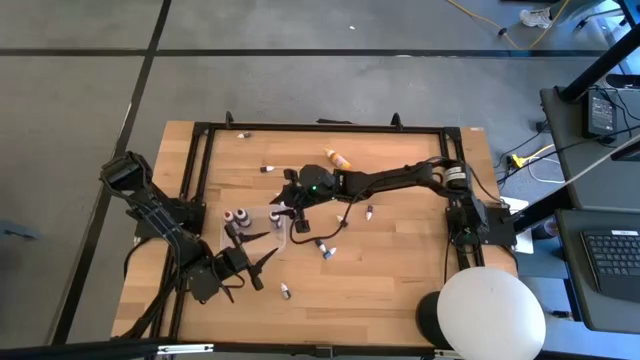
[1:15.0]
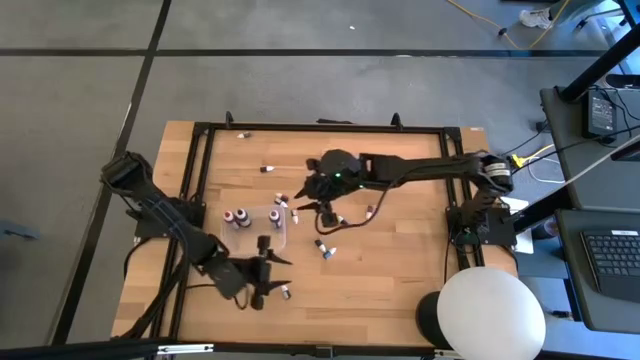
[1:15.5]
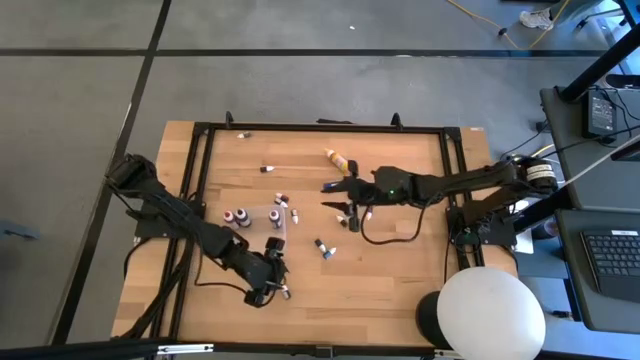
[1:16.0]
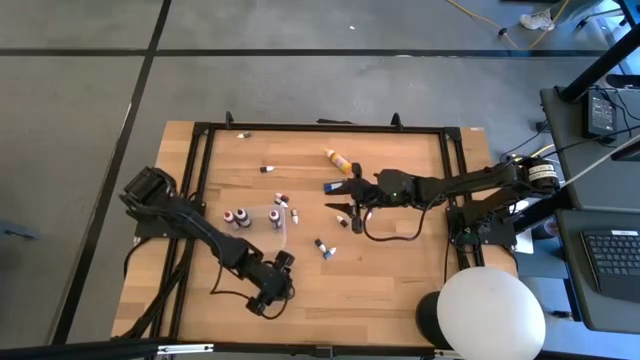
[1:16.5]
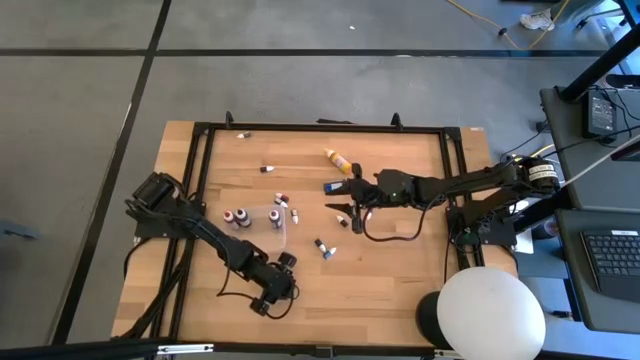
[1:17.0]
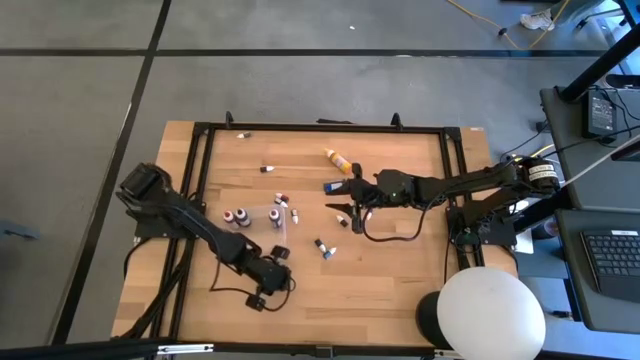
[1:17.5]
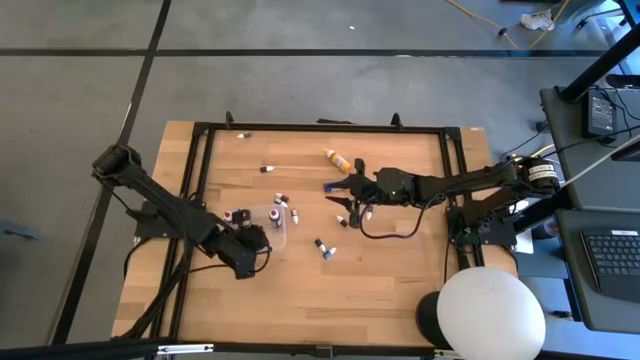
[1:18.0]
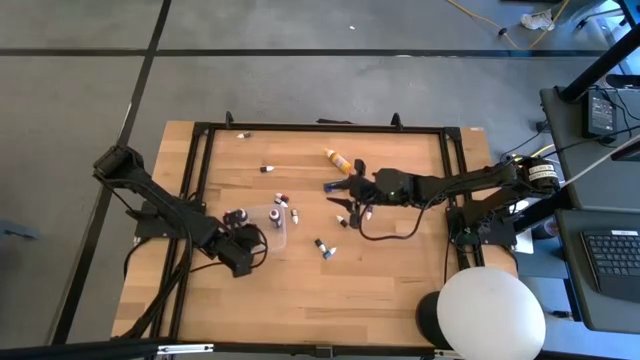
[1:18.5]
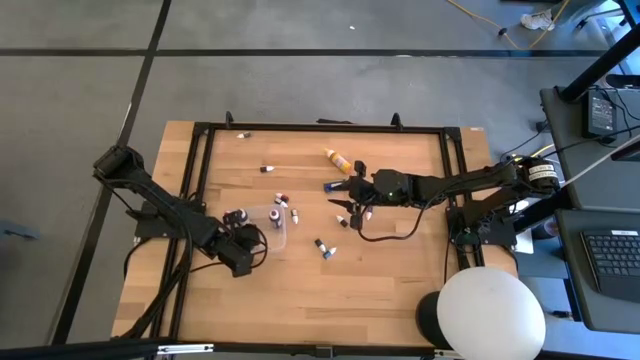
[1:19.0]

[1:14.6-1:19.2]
Task: Pick & Place food coloring
Put the bottom small purple food coloring bottle into the transparent bin

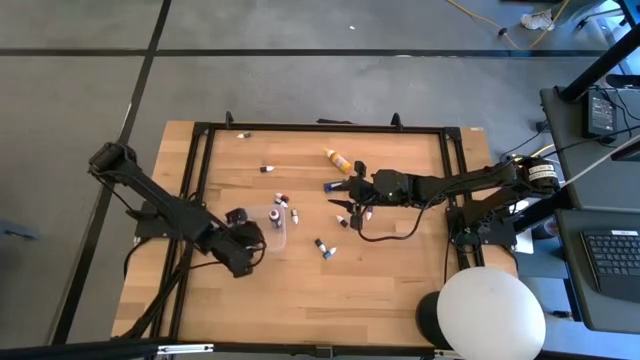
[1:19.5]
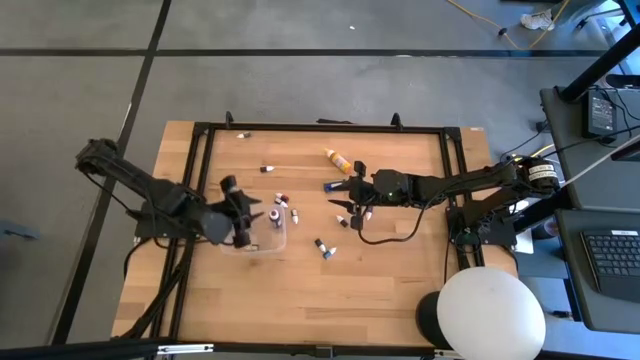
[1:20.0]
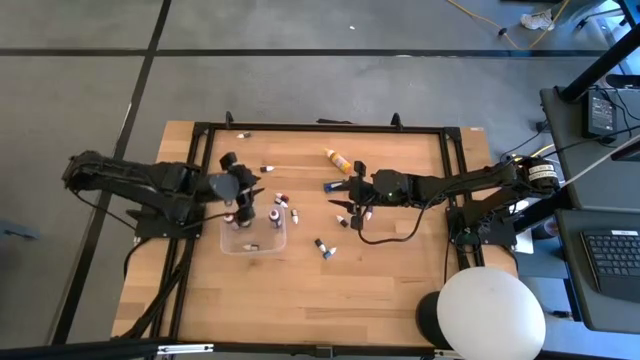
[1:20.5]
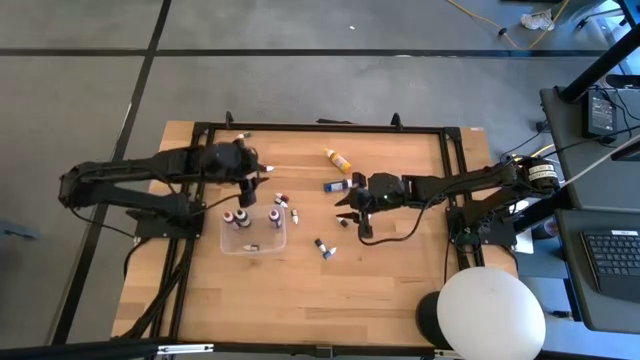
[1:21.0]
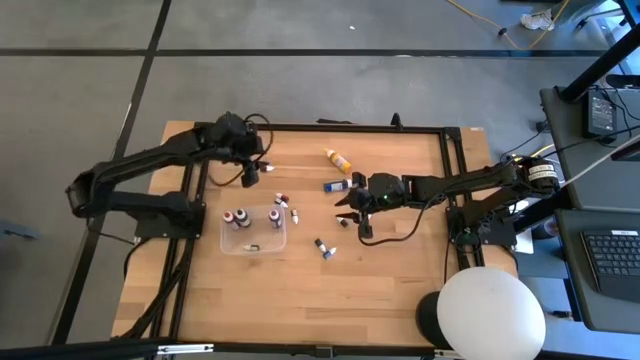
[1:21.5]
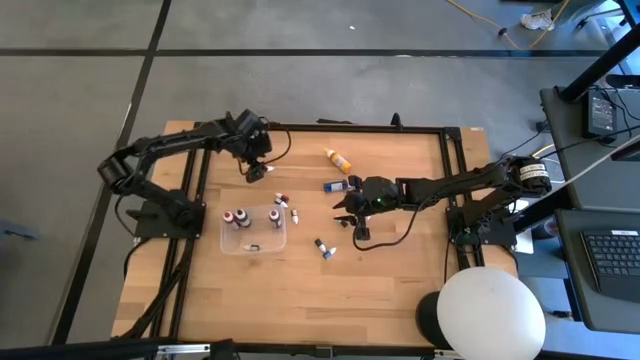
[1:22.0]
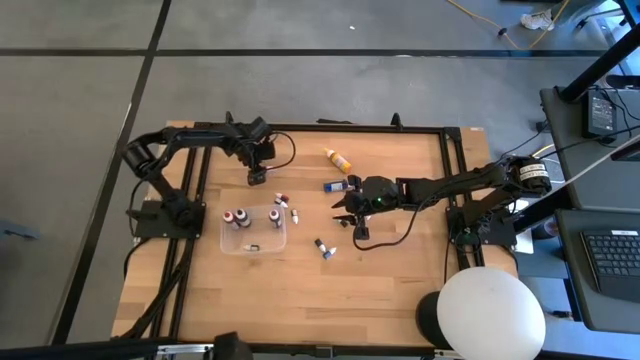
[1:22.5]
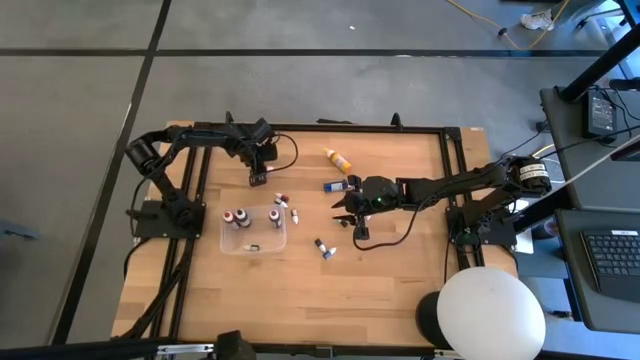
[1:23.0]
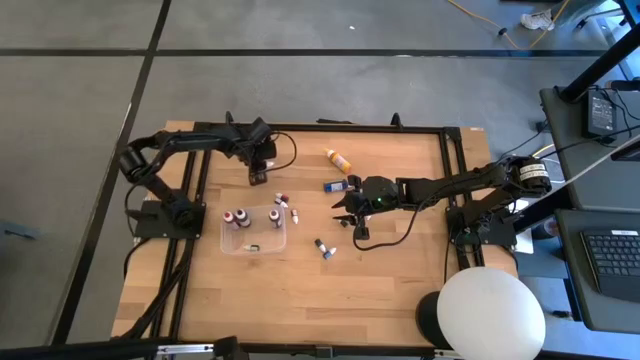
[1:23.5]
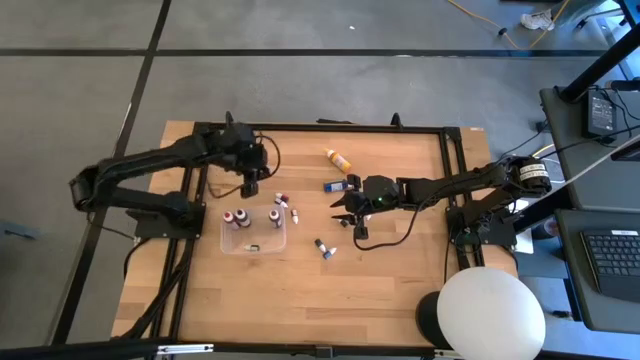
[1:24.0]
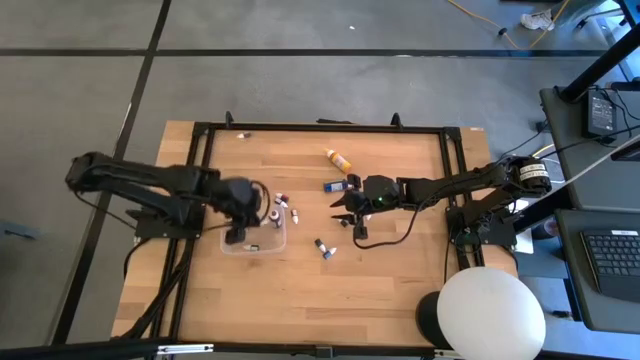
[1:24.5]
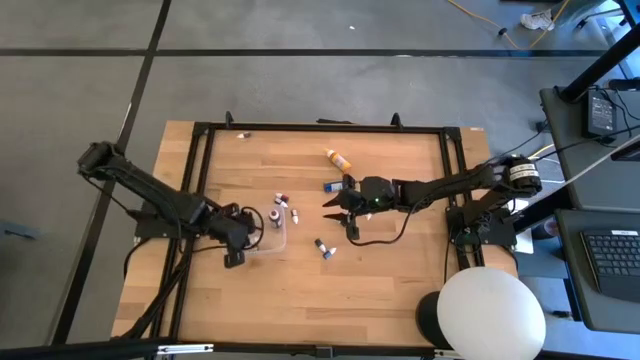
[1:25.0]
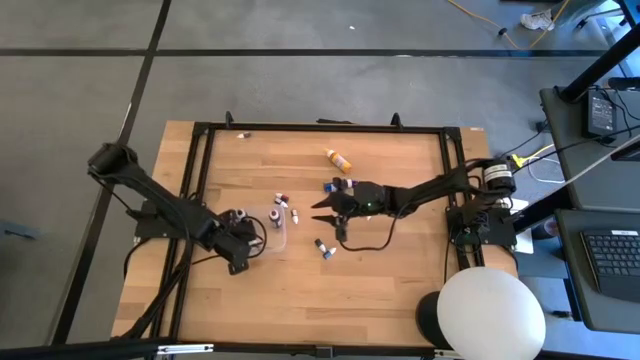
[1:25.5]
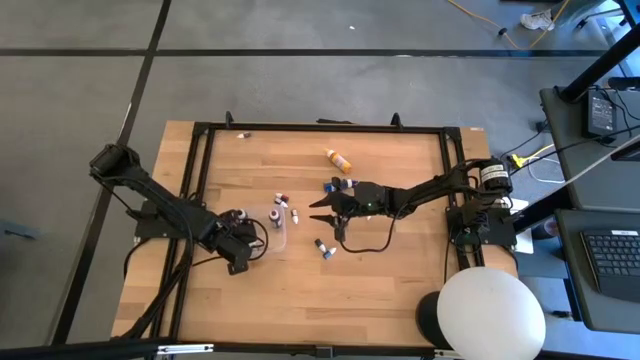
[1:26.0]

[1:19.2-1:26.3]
Put the top small pink food coloring bottle into the transparent bin

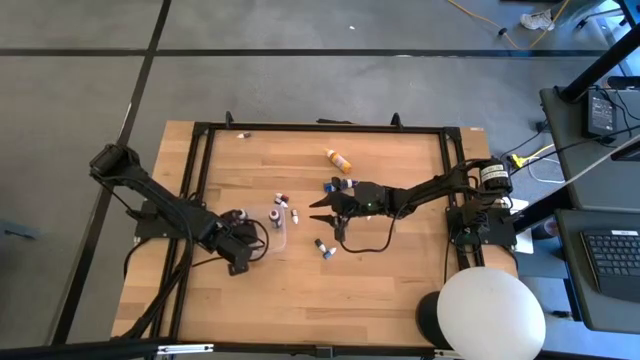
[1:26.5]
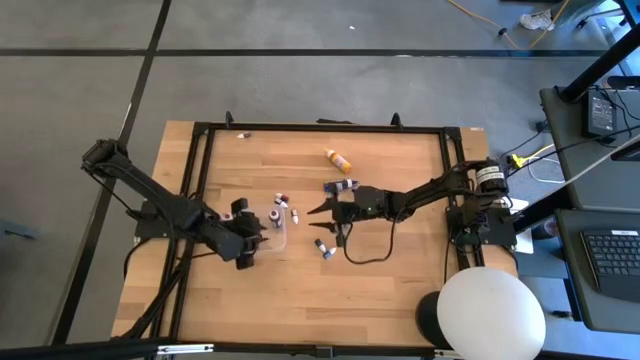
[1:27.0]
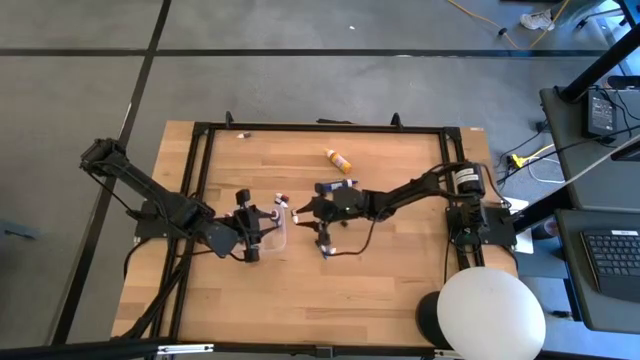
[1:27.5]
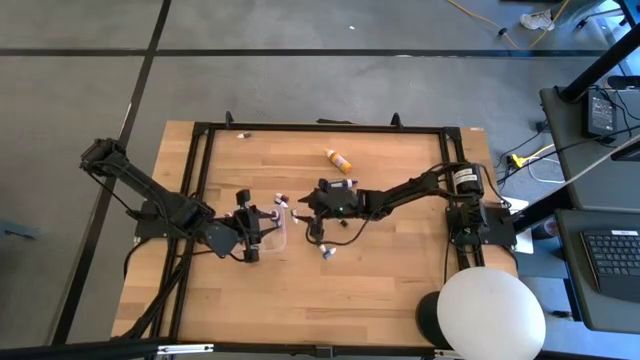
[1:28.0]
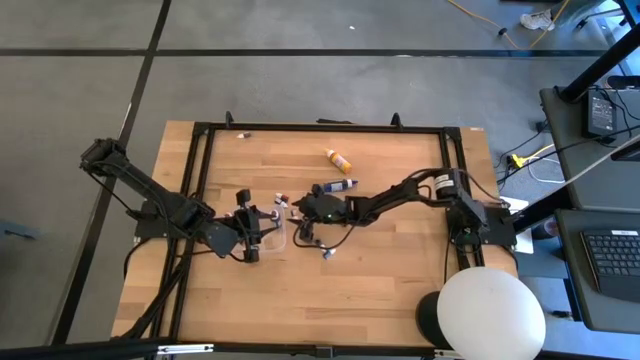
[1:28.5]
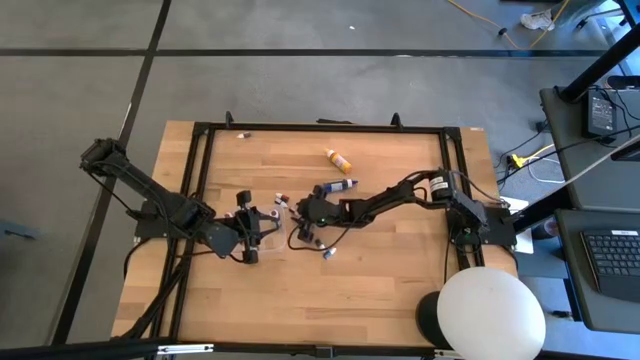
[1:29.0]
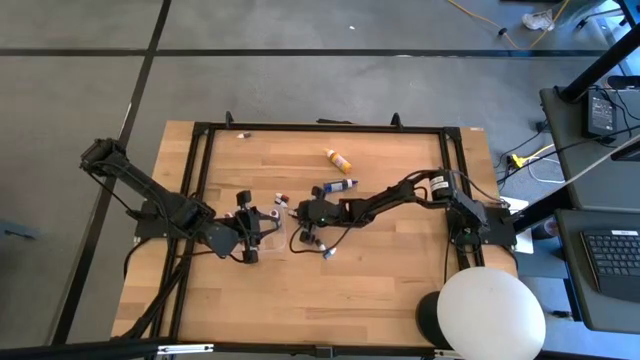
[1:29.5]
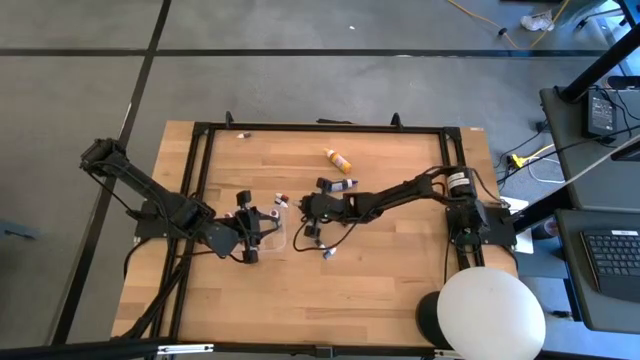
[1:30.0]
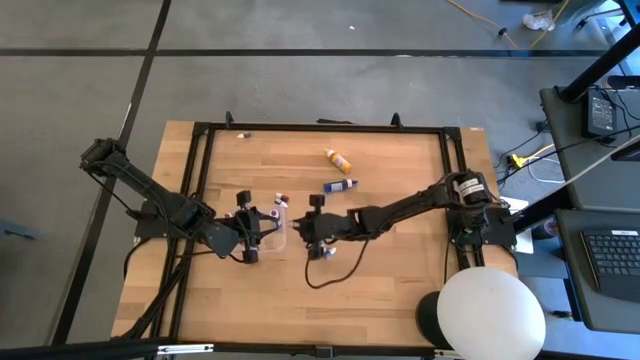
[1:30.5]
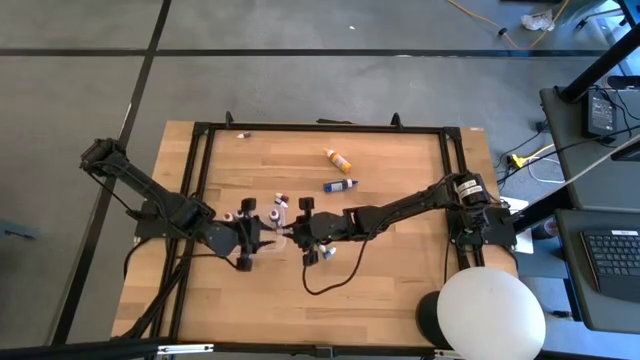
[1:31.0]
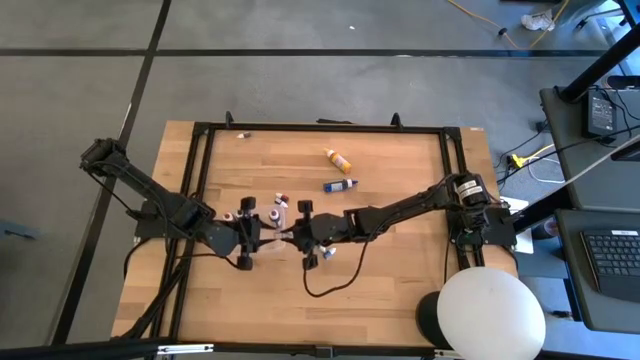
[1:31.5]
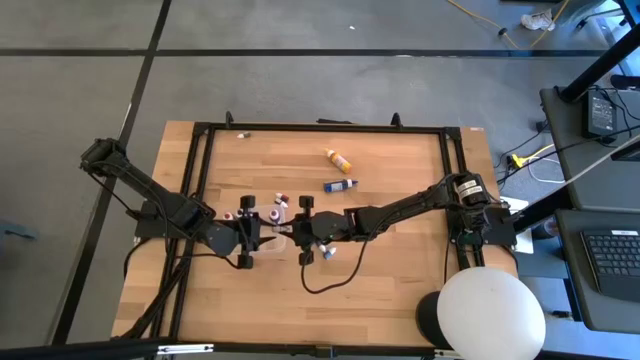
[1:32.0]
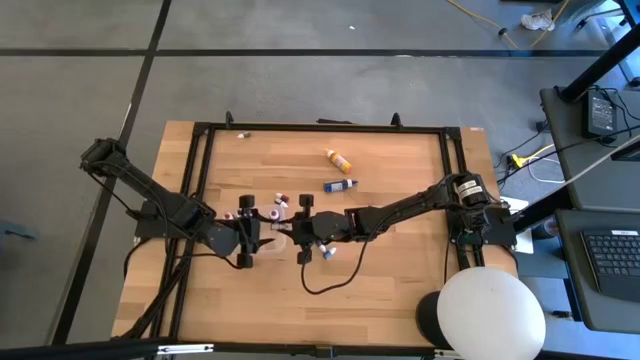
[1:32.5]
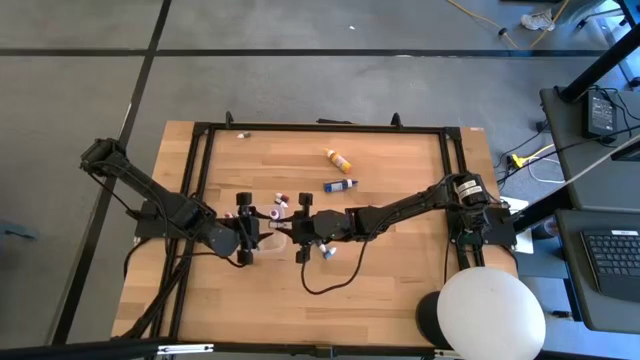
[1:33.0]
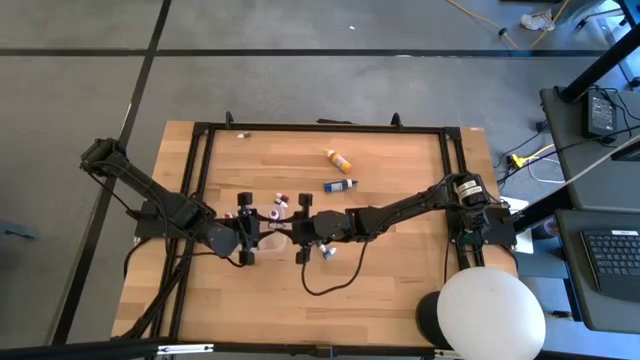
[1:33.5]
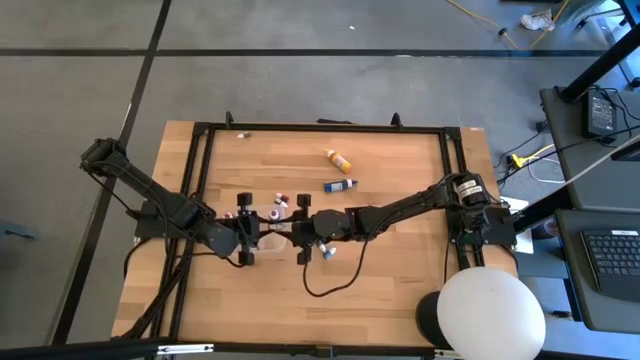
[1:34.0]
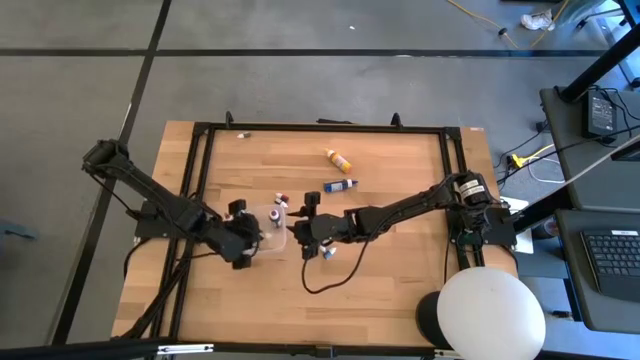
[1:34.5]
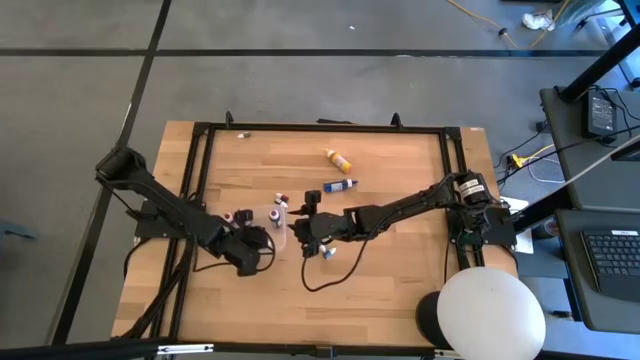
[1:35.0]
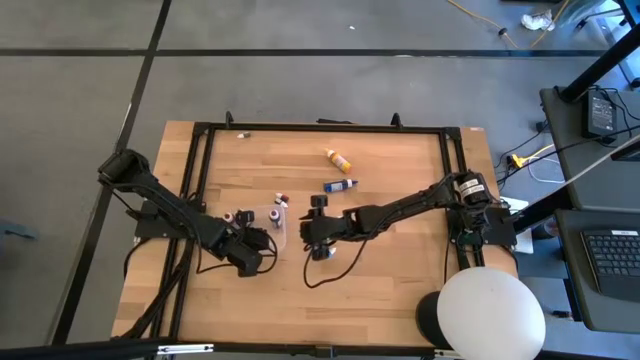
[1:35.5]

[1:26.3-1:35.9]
Put the bottom small red food coloring bottle into the transparent bin
